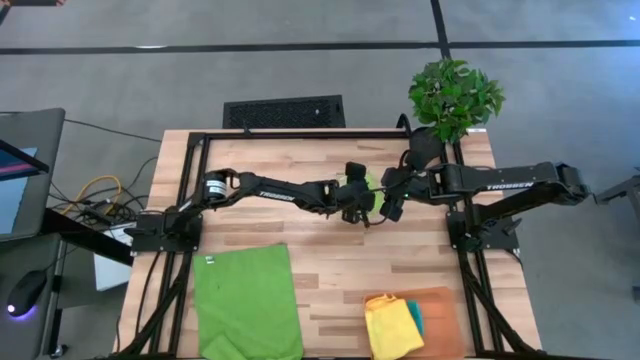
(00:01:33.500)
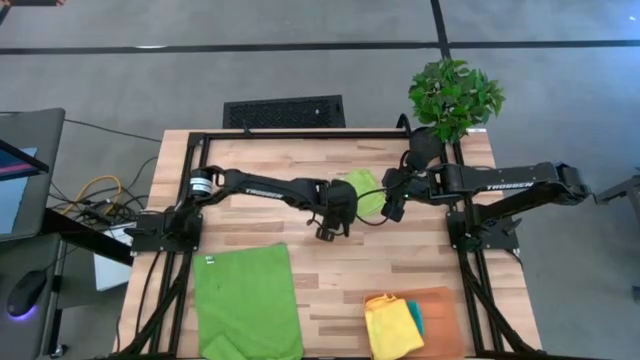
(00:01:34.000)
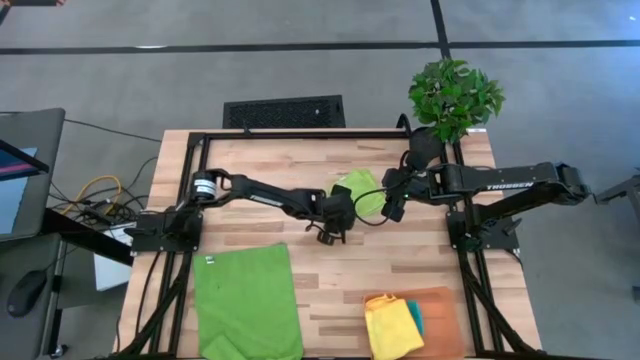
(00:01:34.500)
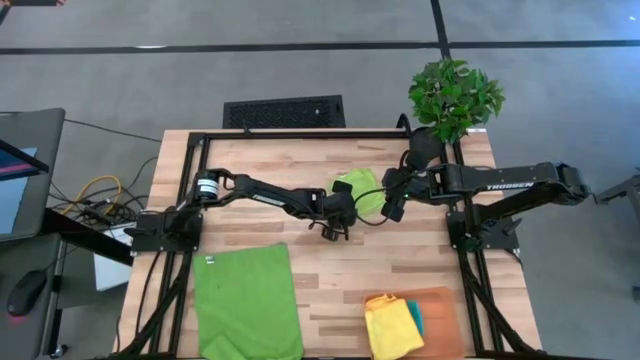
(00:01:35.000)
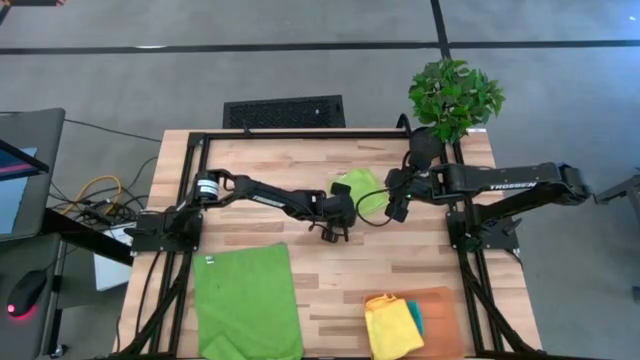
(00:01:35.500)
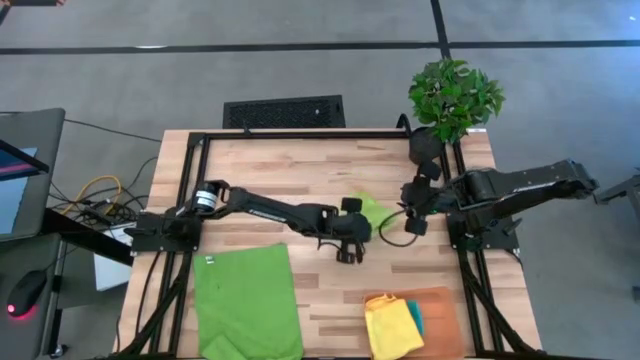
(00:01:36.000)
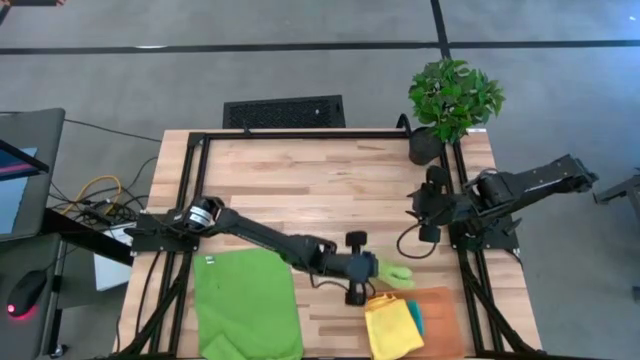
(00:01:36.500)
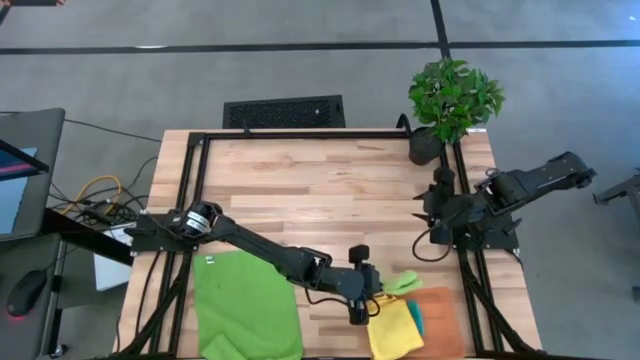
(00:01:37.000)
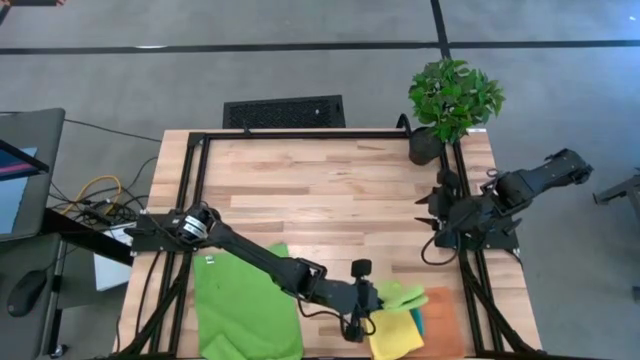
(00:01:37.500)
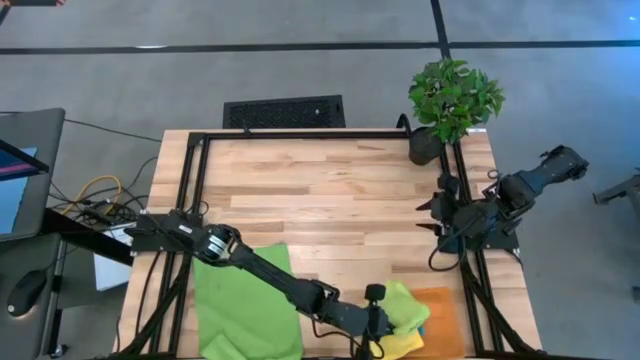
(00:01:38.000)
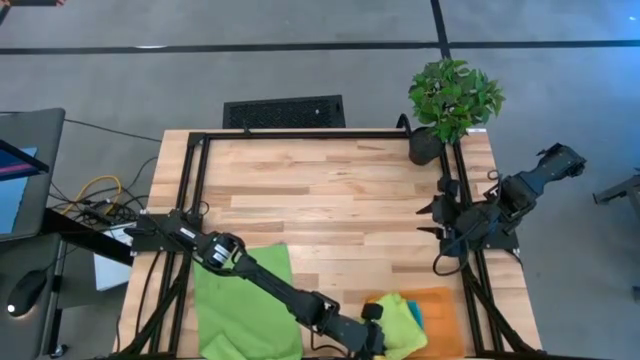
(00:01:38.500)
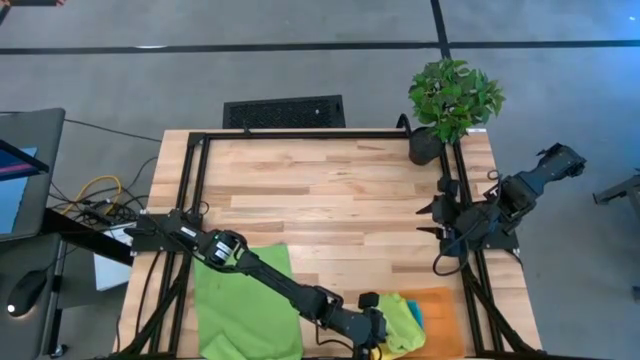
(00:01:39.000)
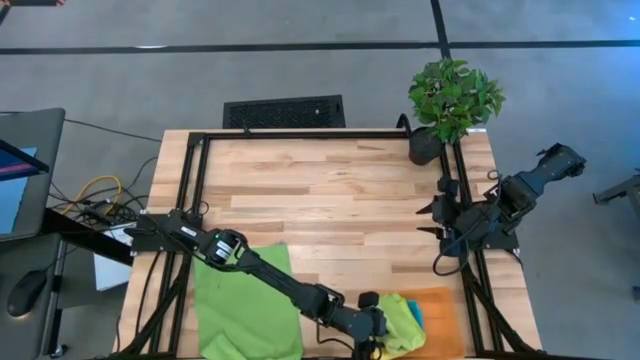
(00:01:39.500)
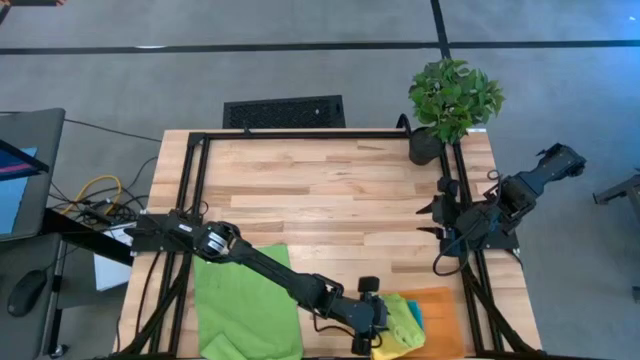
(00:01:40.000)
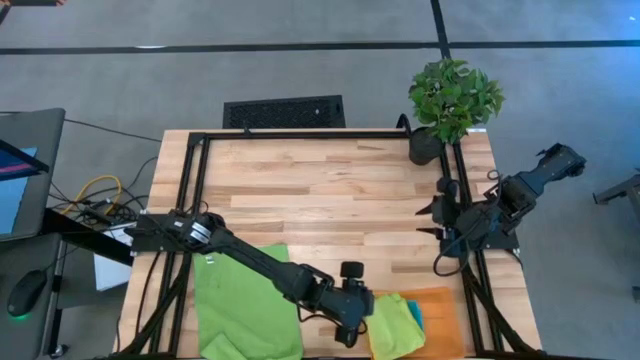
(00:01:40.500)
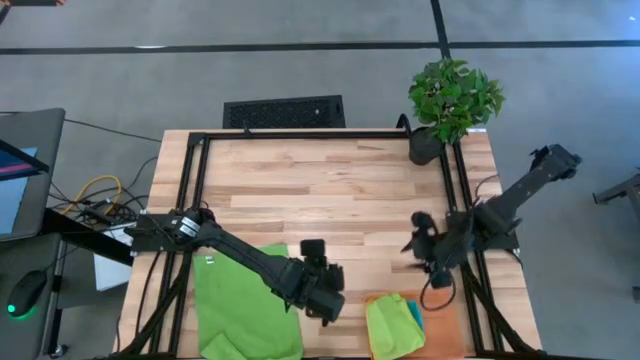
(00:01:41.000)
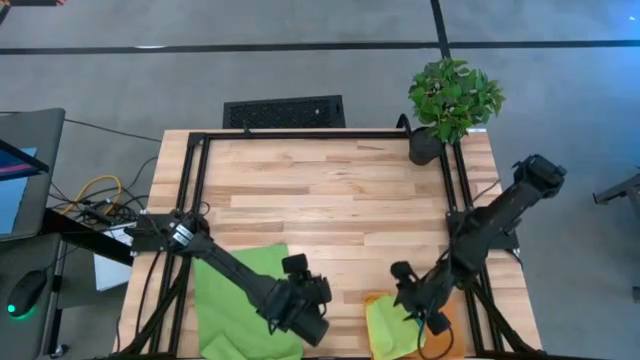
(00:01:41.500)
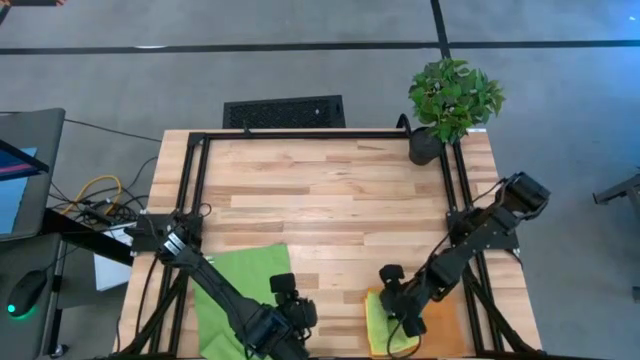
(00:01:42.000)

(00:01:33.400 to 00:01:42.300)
Task: Fold microfiber towels
Put the folded light green microfiber towel into the orange bin

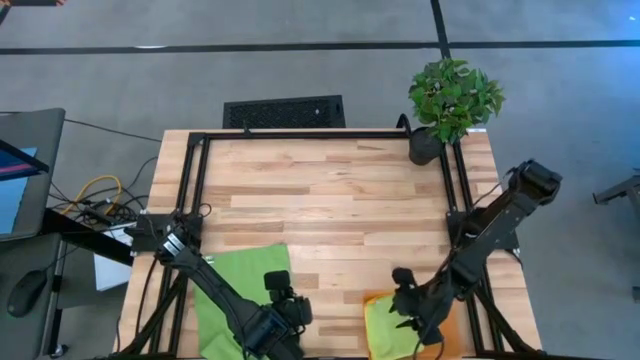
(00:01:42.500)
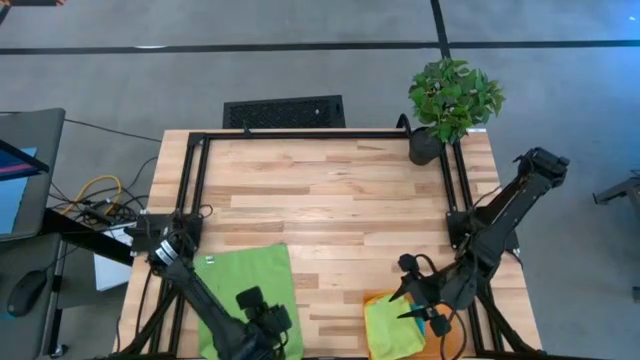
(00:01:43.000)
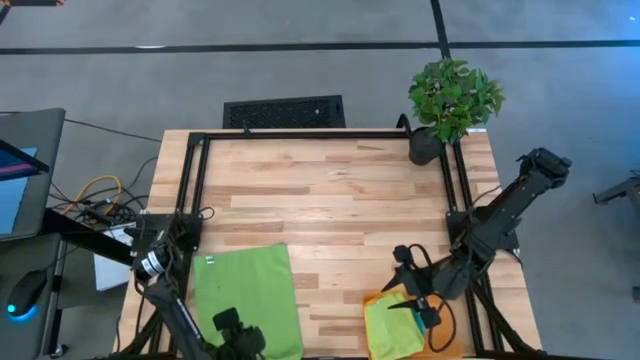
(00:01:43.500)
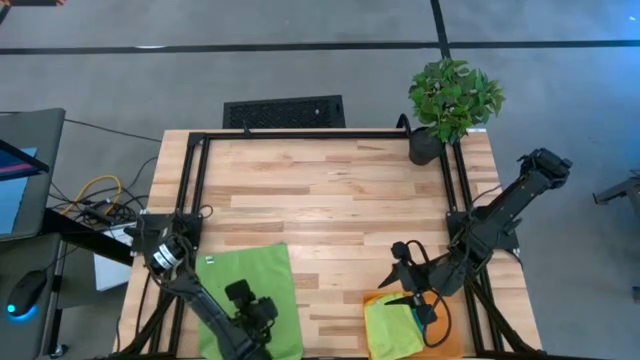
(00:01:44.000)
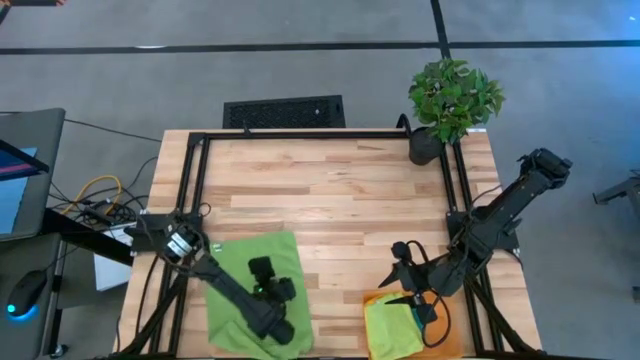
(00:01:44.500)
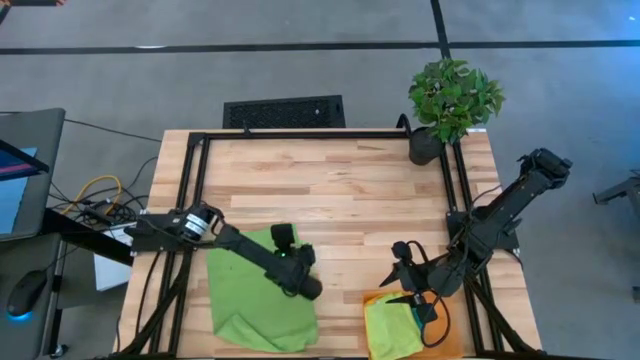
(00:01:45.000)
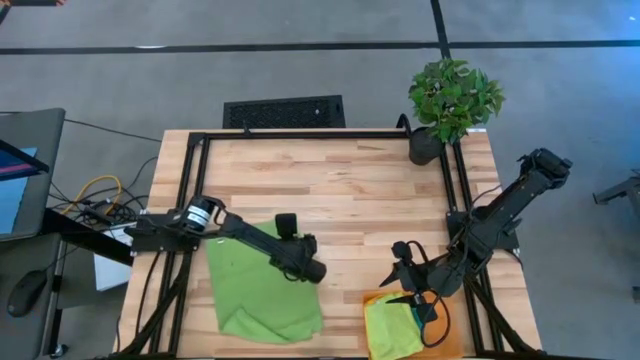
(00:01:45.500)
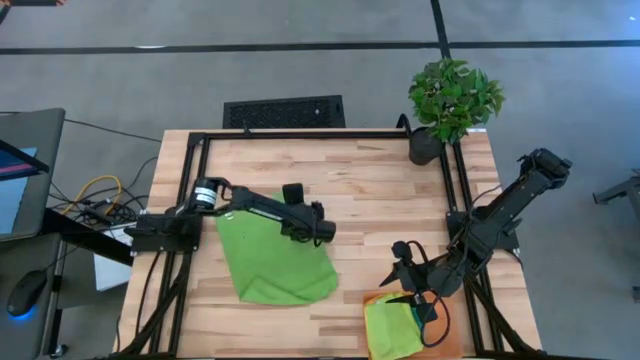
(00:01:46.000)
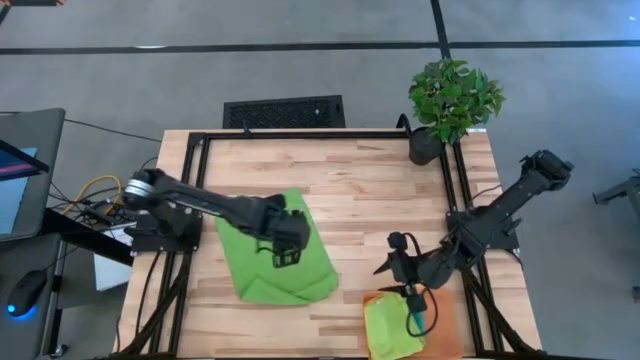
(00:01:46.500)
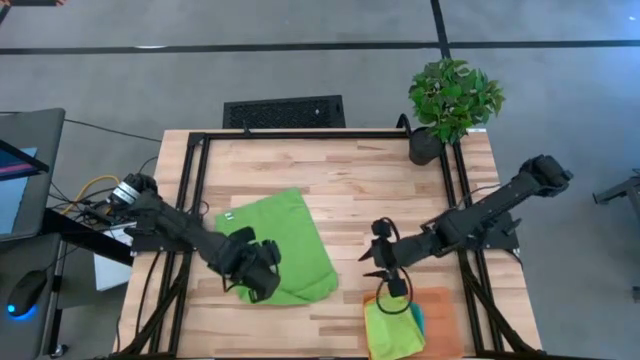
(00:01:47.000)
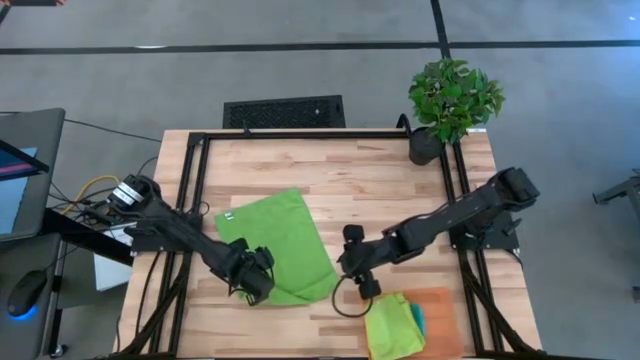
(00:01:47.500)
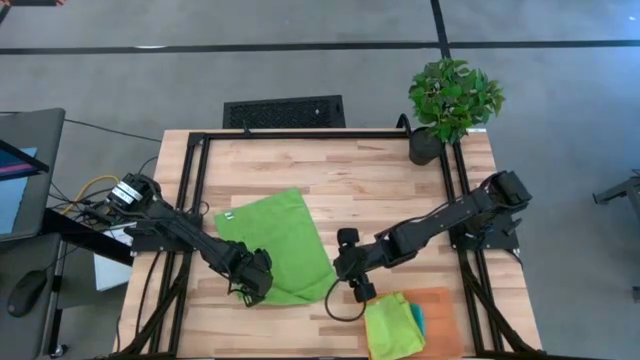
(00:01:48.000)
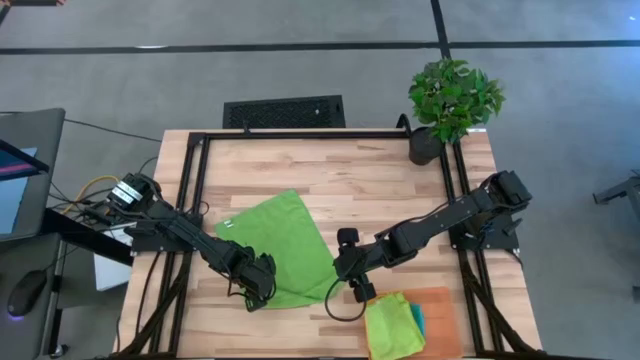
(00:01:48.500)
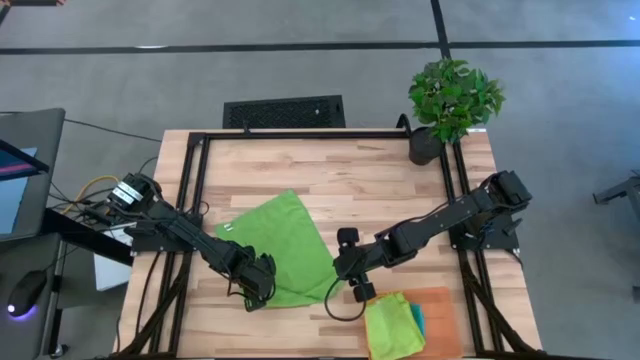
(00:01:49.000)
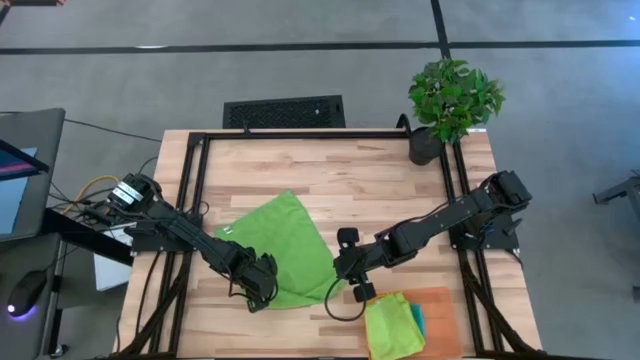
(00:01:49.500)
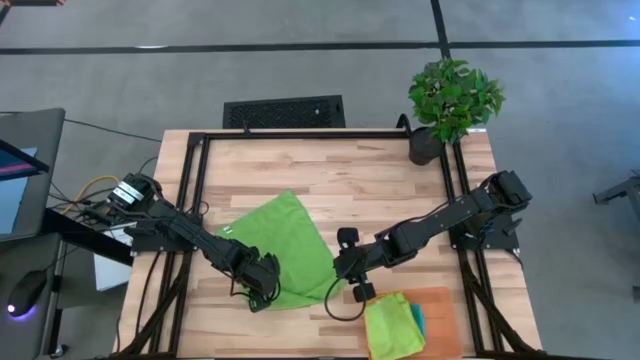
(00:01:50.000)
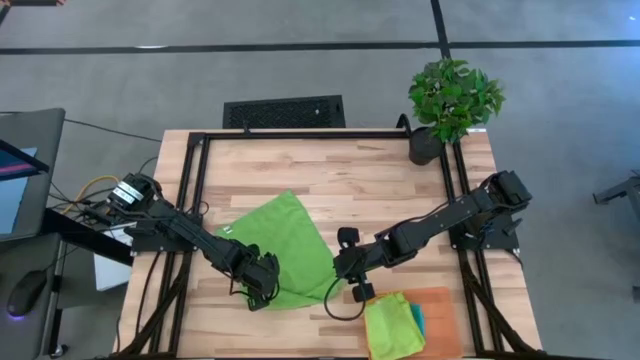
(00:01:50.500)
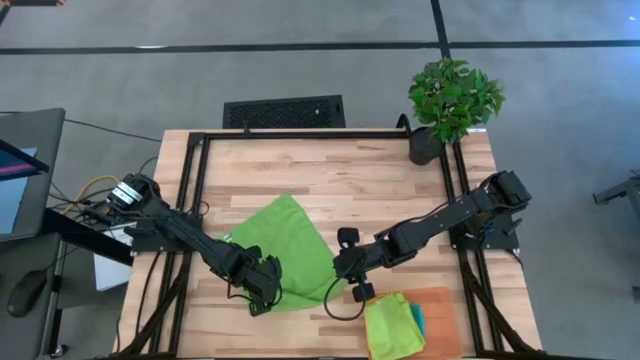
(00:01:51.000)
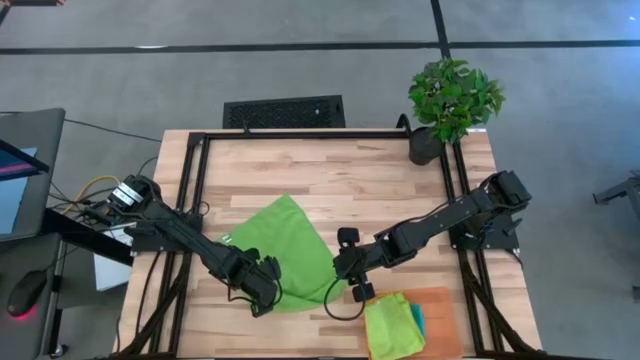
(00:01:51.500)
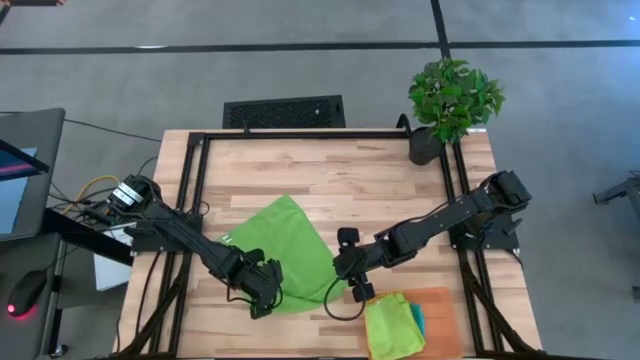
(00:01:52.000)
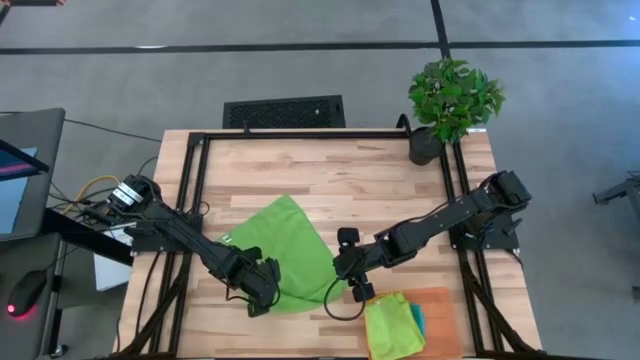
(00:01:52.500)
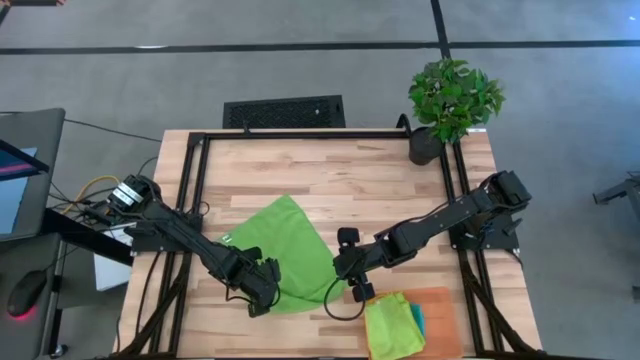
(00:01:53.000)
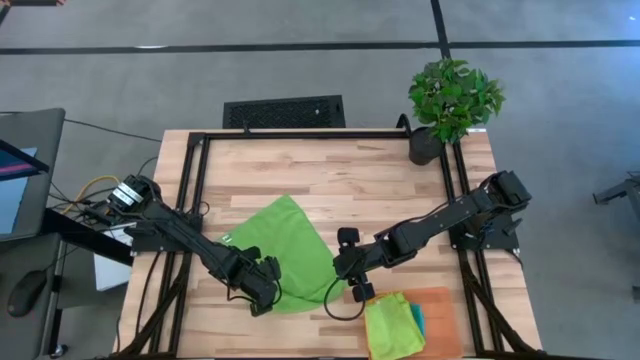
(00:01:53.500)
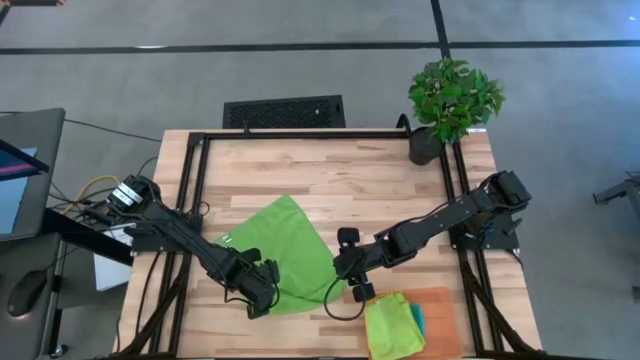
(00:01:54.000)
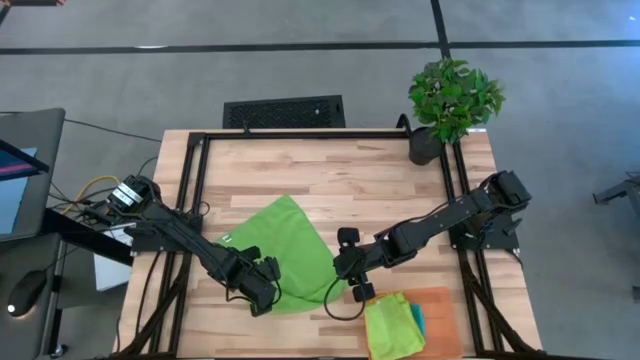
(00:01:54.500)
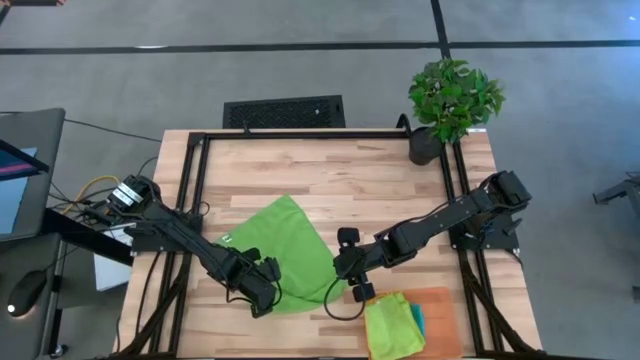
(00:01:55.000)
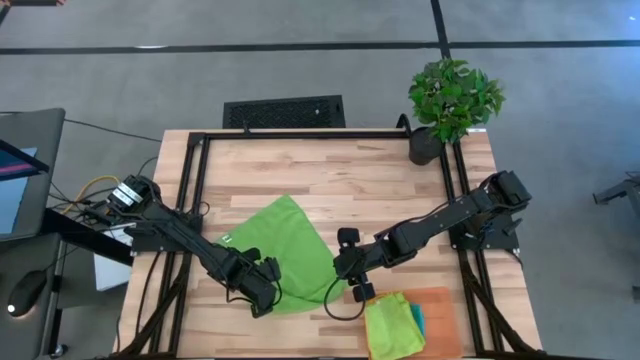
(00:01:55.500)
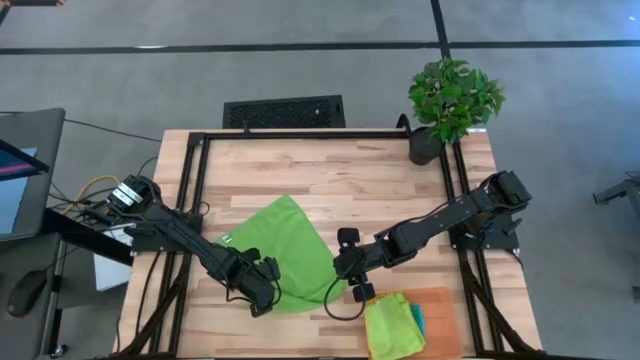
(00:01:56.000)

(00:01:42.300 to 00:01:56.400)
Fold the green microfiber towel
